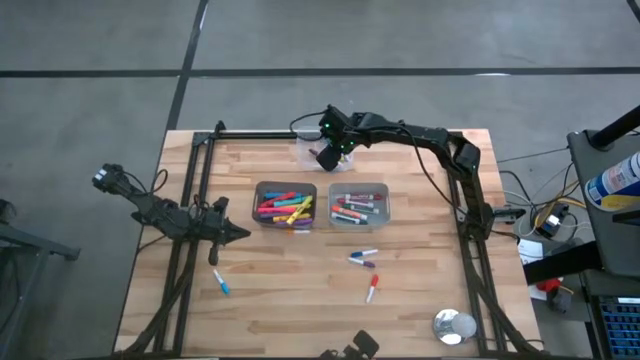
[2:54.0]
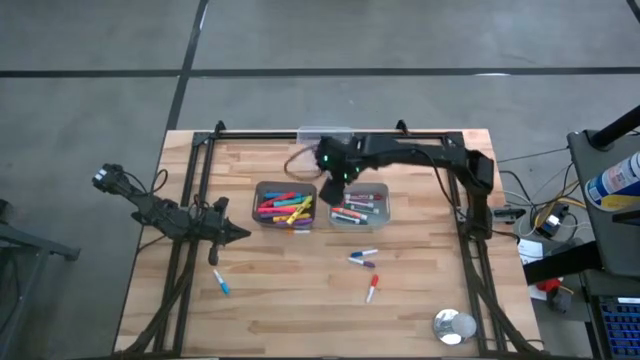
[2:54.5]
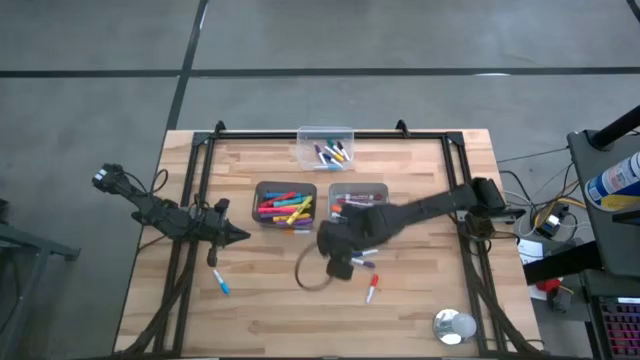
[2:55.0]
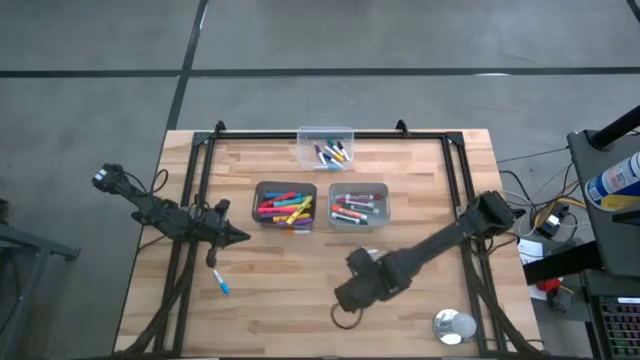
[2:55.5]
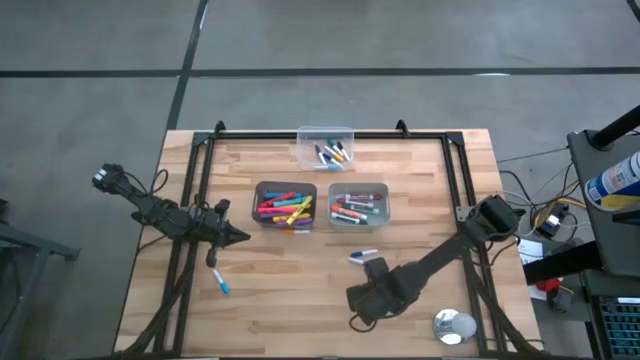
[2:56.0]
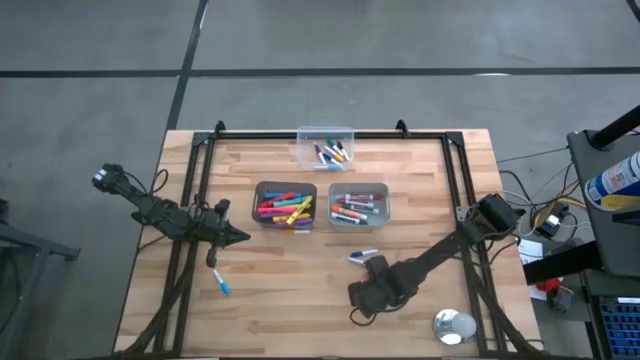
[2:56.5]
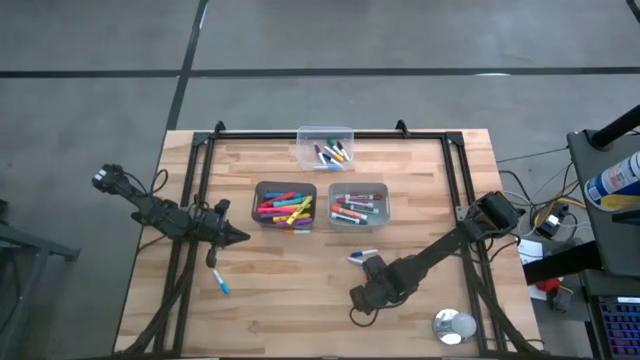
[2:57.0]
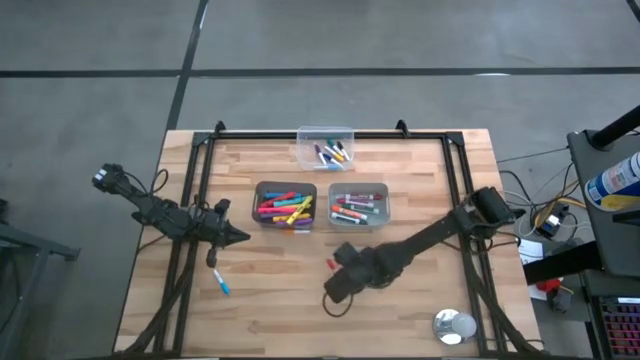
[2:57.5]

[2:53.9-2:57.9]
Task: Pick & Place Markers
Put the small red highlighter pen into the transparent bin

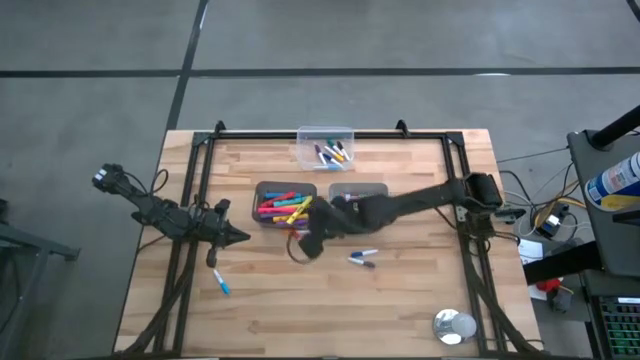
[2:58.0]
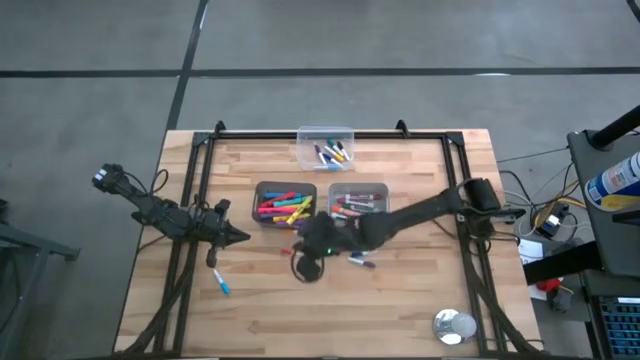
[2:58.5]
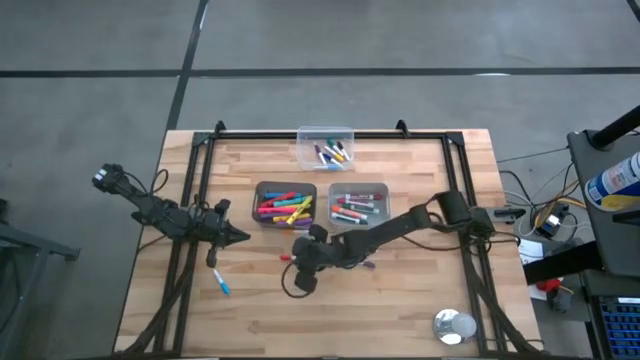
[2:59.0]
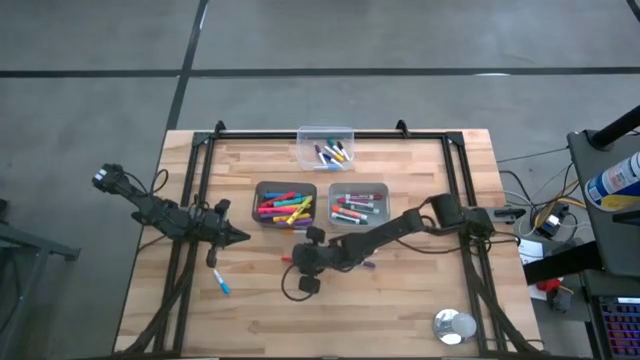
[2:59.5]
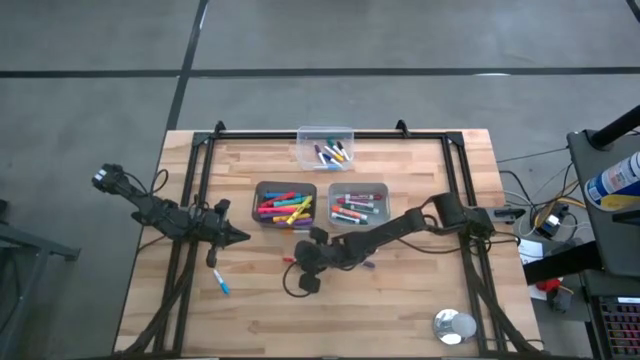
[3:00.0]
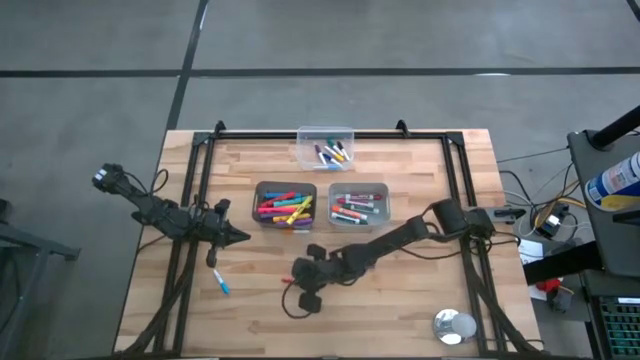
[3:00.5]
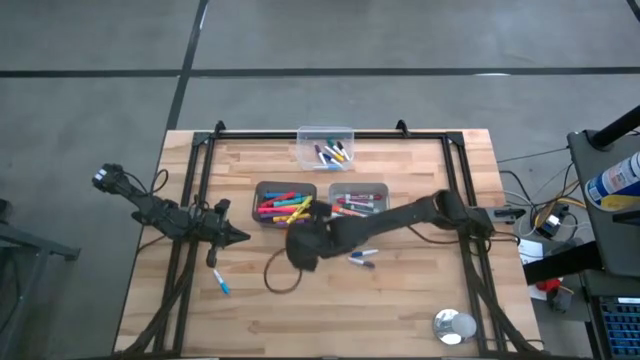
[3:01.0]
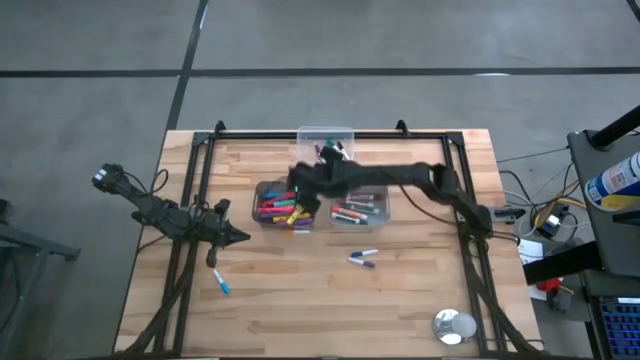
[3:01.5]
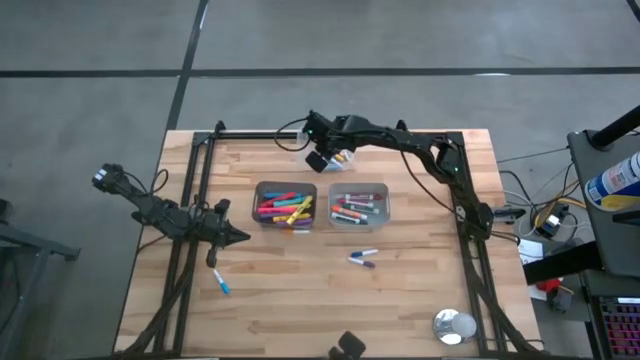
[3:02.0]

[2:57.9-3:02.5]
Put the small red highlighter pen into the transparent bin

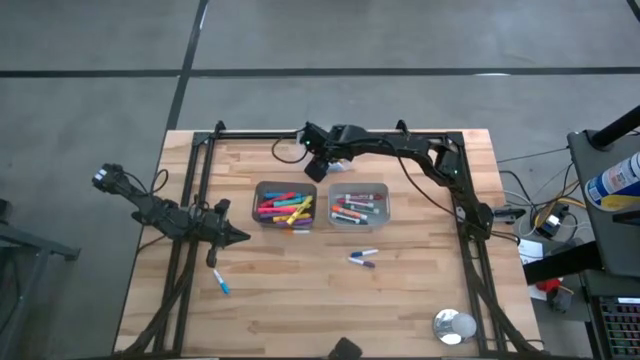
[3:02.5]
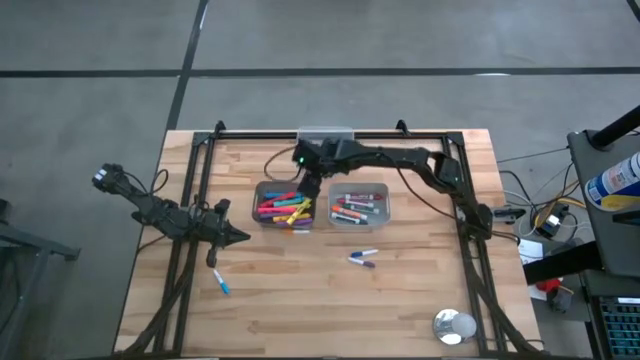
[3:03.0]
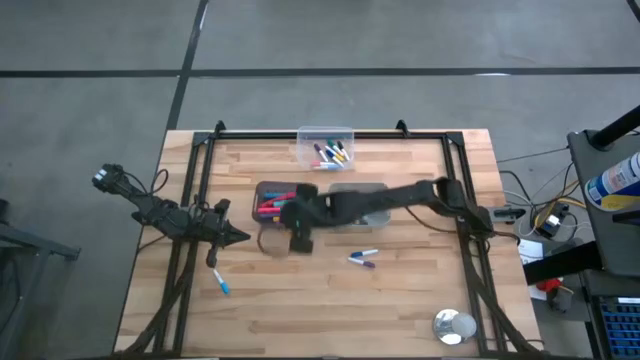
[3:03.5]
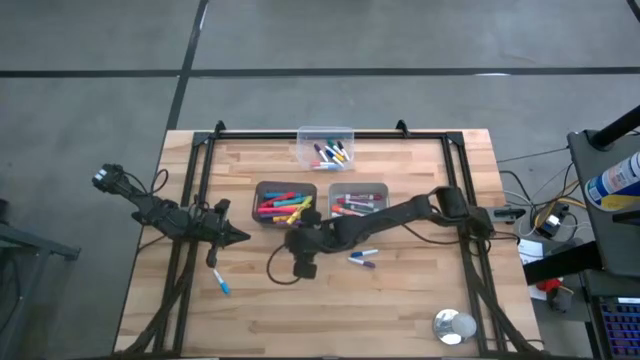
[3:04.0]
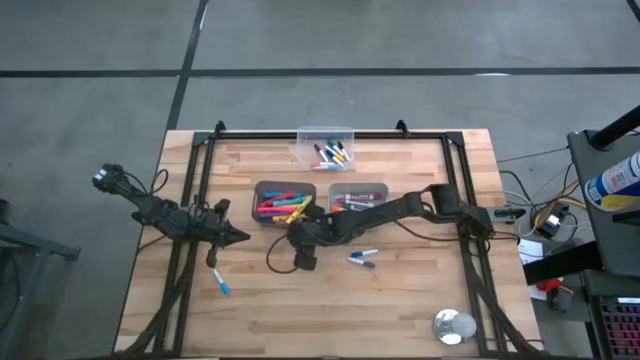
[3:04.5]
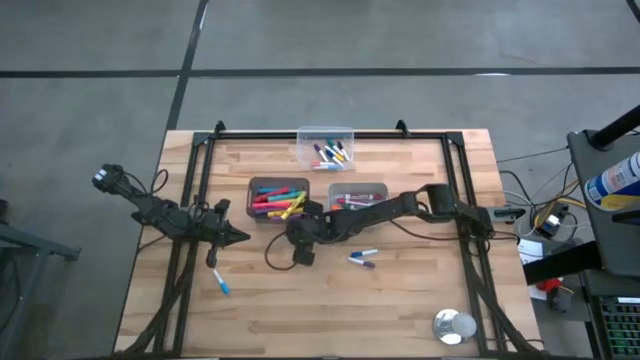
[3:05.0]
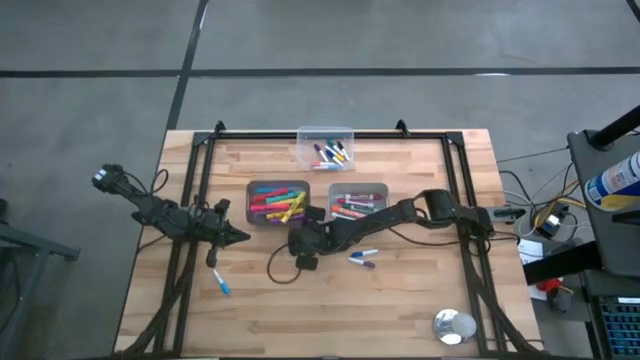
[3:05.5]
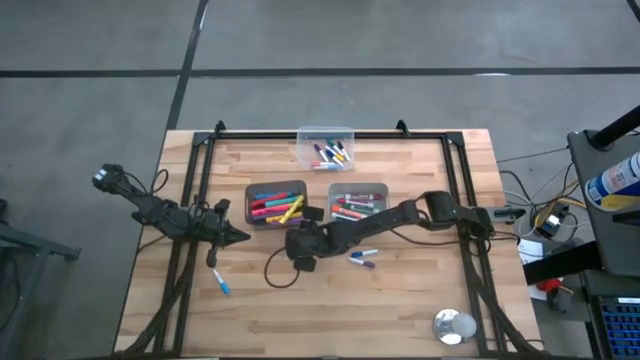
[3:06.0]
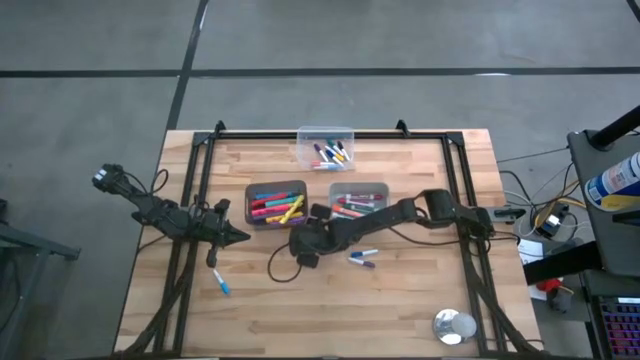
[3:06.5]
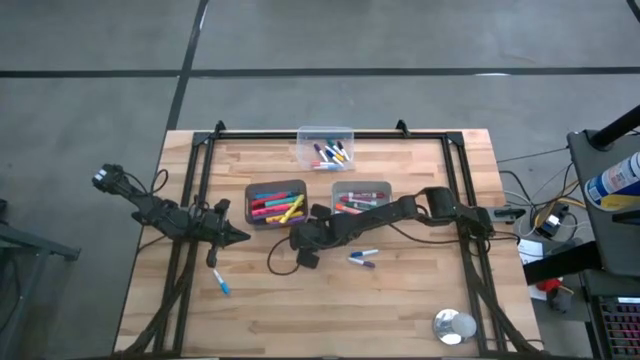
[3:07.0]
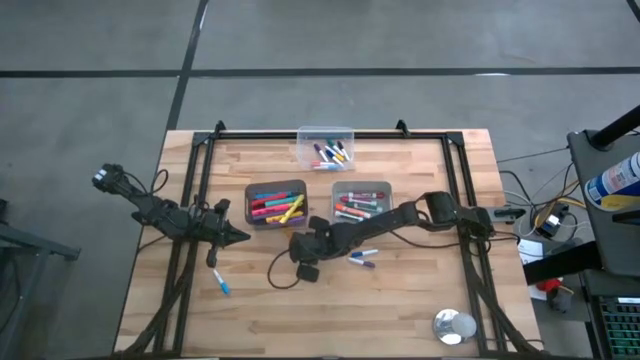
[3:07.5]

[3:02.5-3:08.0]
Put the small orange highlighter pen into the transparent bin

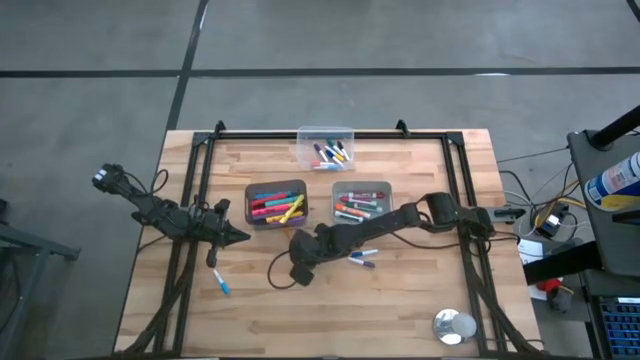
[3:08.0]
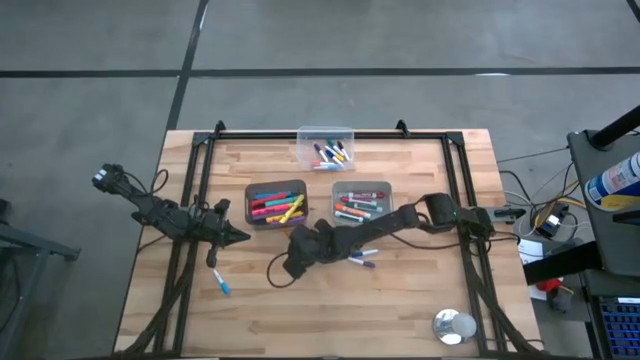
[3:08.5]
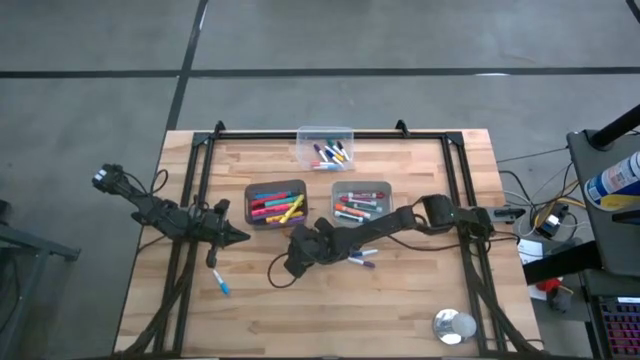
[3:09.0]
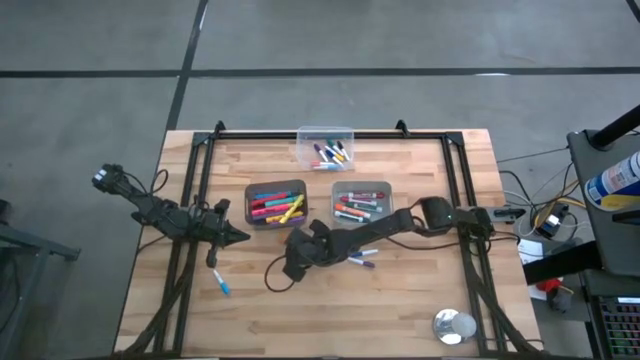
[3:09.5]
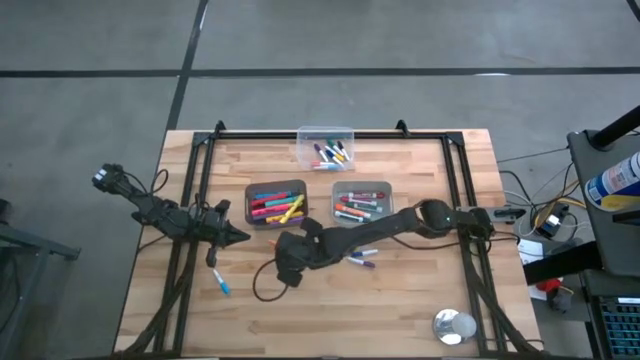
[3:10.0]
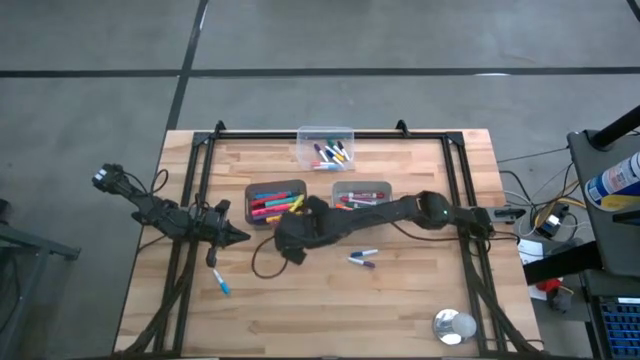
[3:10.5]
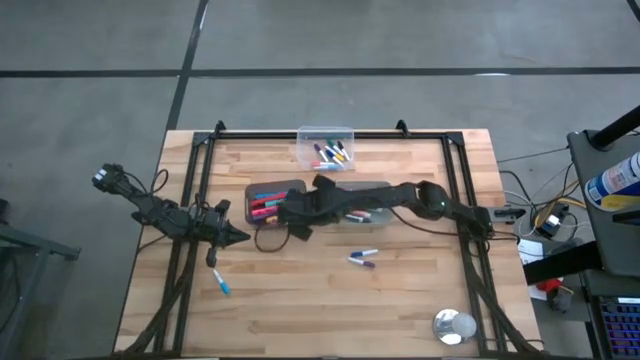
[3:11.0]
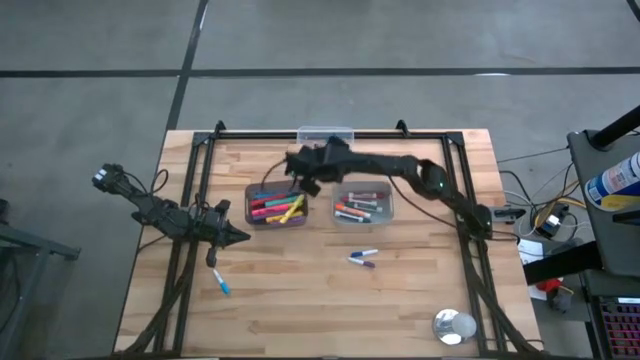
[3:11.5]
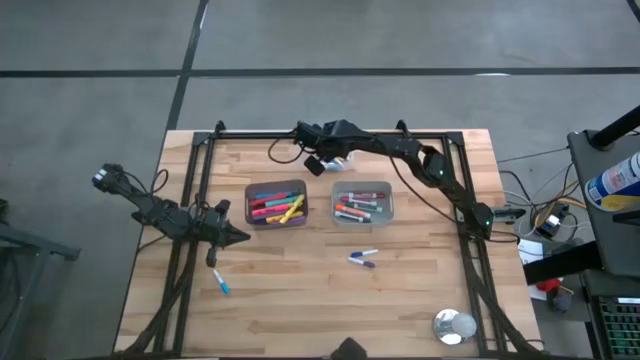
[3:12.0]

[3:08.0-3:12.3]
Put the small orange highlighter pen into the transparent bin
